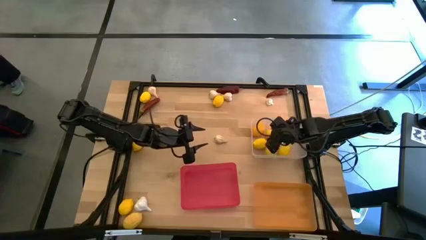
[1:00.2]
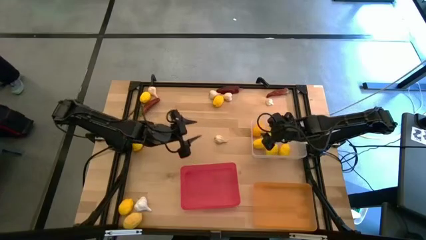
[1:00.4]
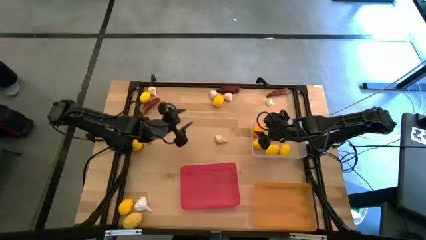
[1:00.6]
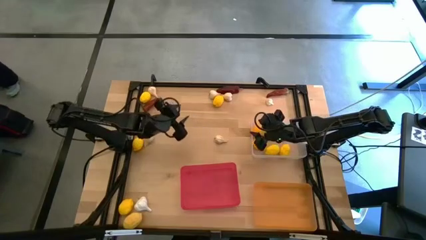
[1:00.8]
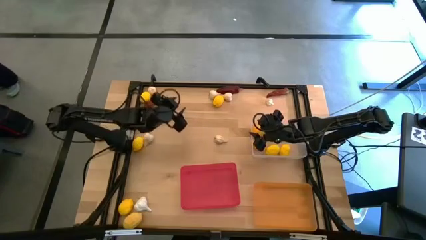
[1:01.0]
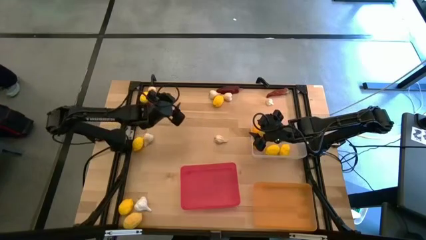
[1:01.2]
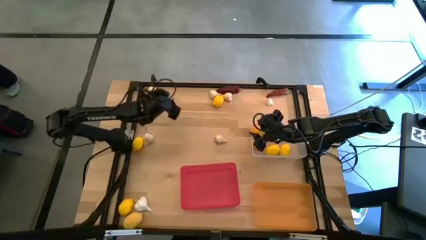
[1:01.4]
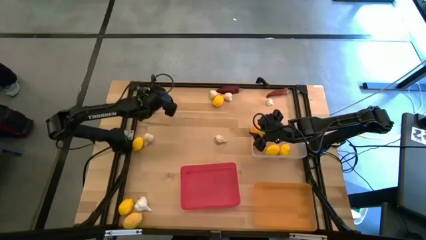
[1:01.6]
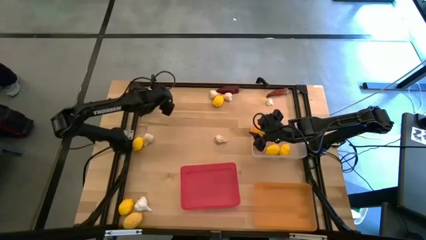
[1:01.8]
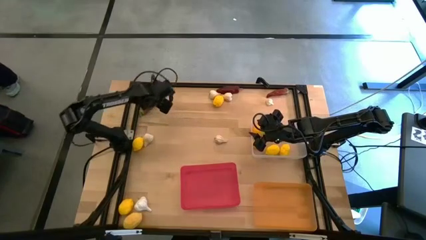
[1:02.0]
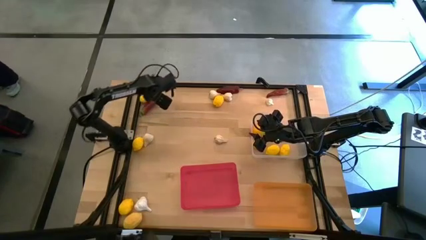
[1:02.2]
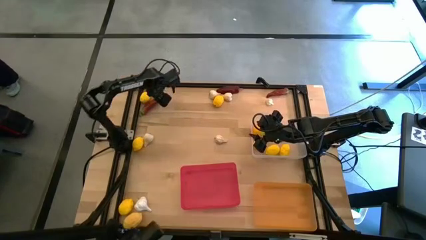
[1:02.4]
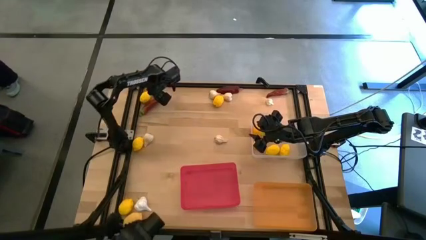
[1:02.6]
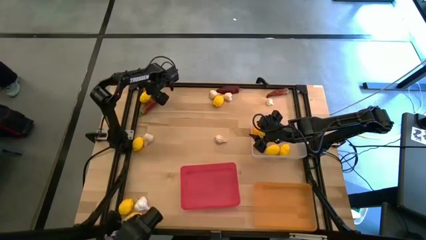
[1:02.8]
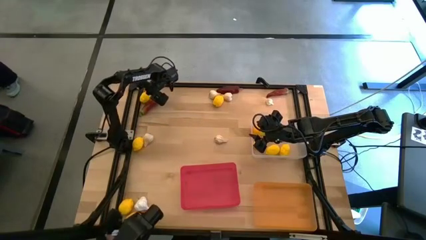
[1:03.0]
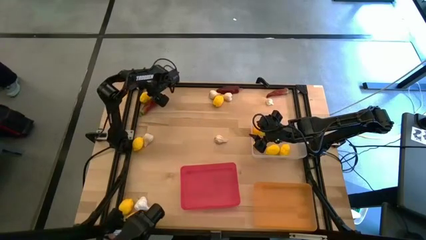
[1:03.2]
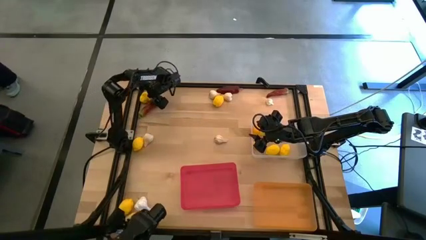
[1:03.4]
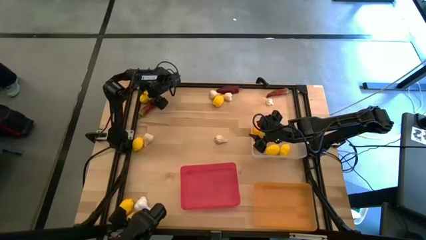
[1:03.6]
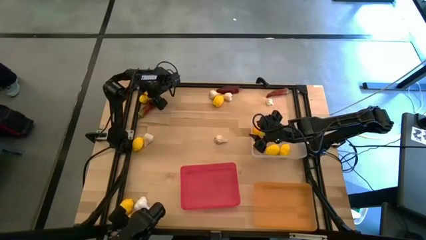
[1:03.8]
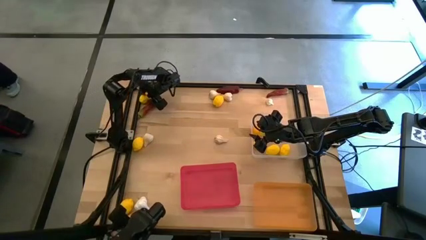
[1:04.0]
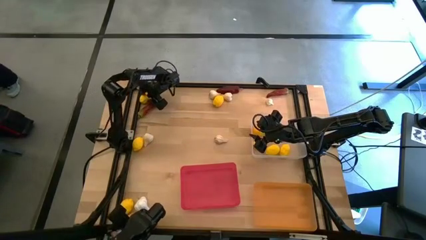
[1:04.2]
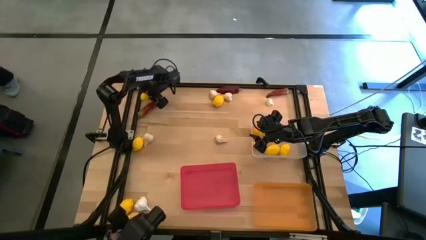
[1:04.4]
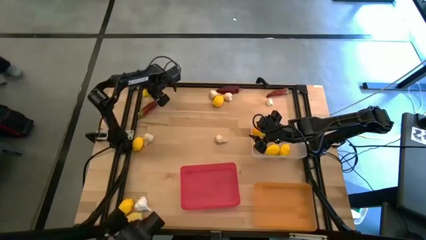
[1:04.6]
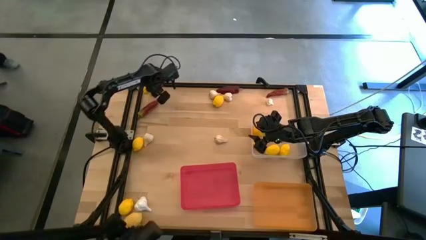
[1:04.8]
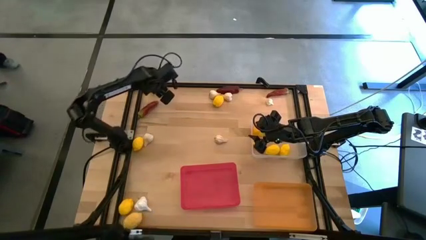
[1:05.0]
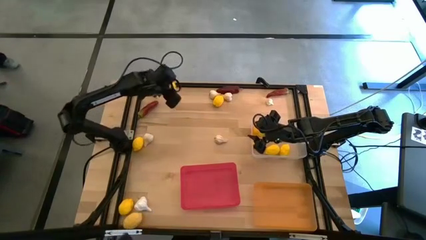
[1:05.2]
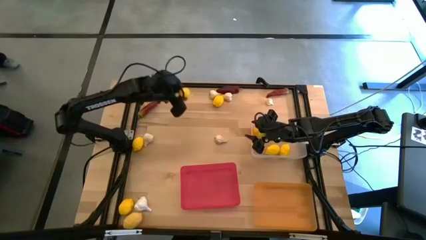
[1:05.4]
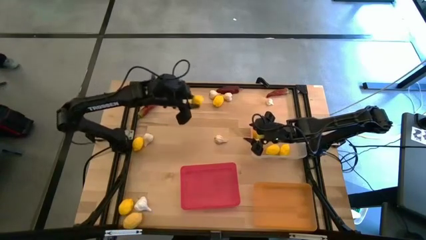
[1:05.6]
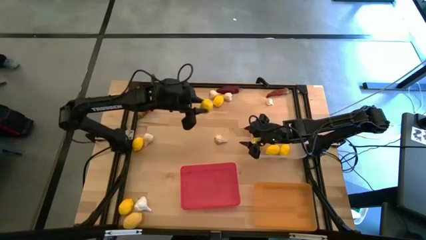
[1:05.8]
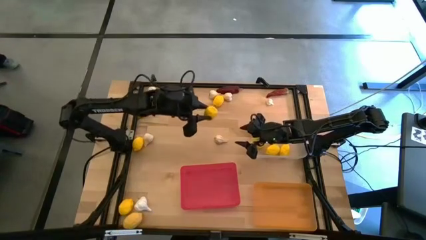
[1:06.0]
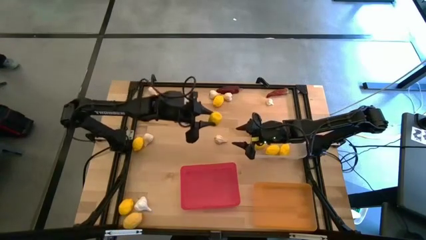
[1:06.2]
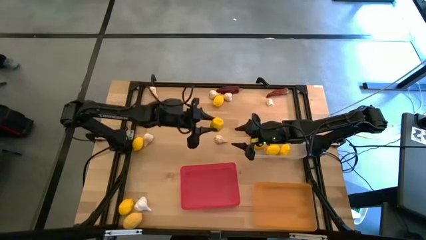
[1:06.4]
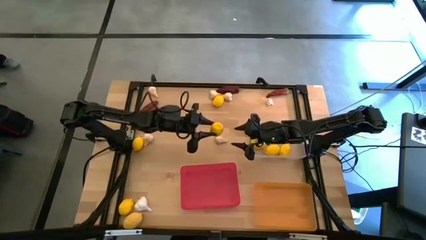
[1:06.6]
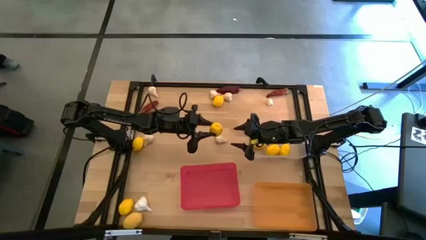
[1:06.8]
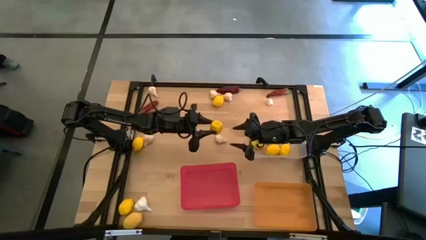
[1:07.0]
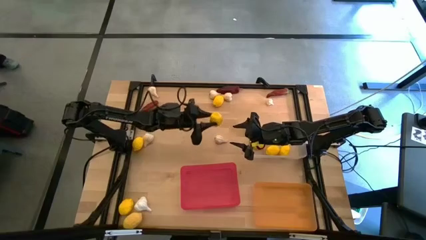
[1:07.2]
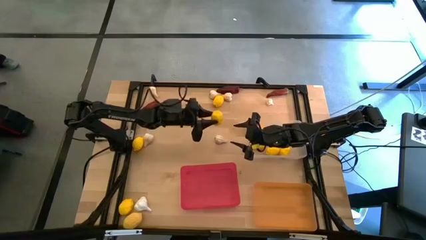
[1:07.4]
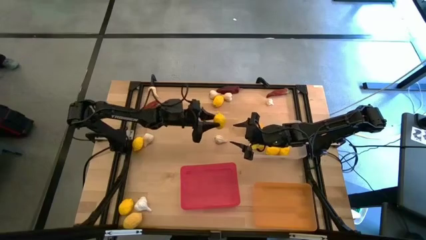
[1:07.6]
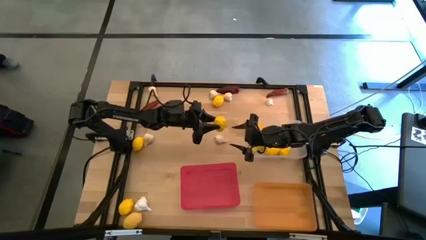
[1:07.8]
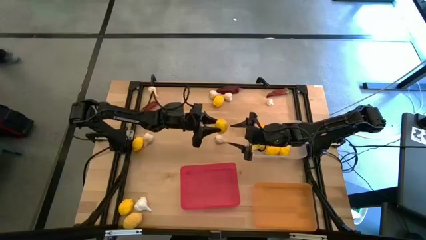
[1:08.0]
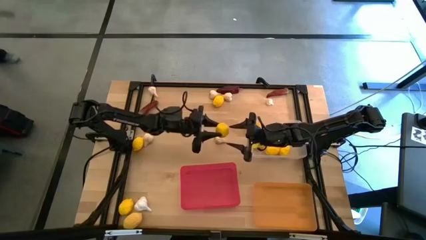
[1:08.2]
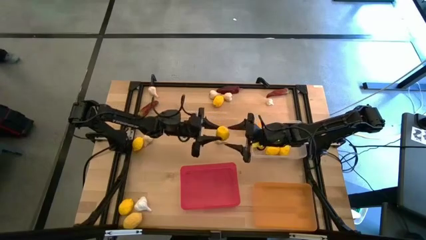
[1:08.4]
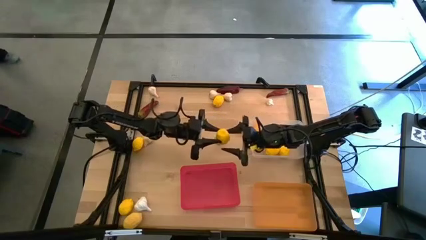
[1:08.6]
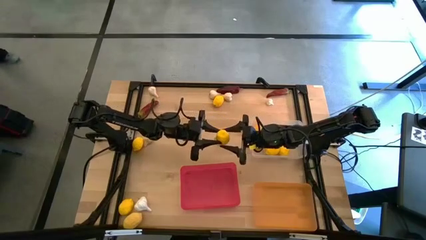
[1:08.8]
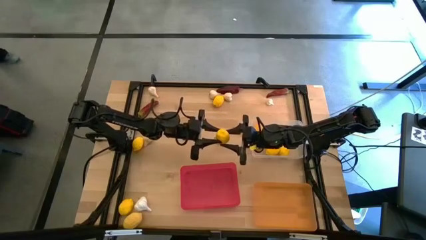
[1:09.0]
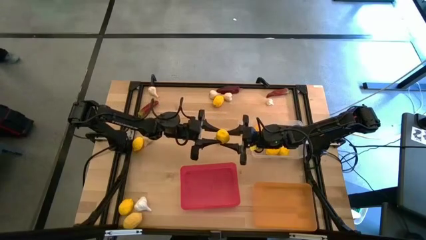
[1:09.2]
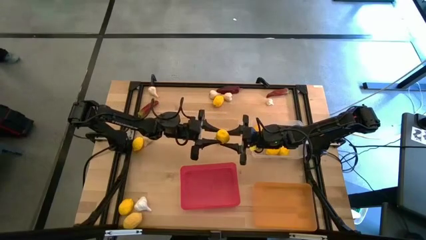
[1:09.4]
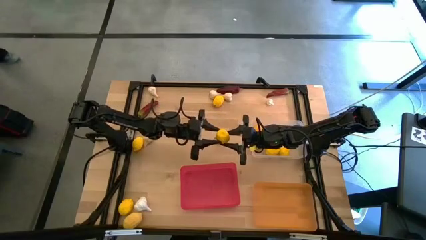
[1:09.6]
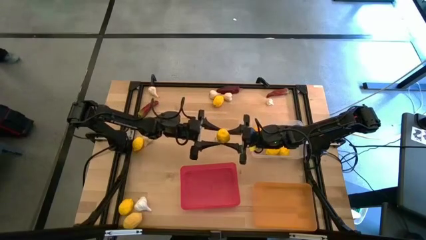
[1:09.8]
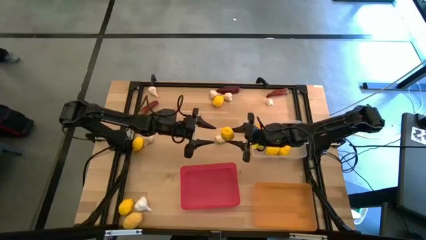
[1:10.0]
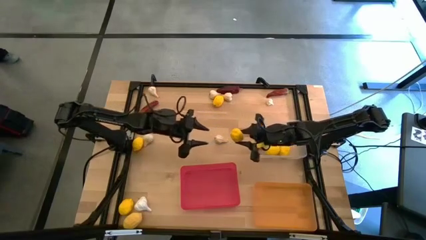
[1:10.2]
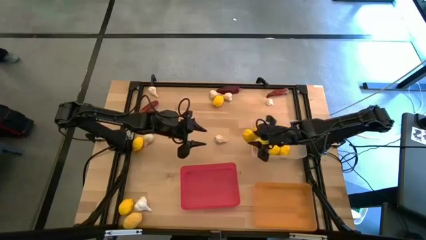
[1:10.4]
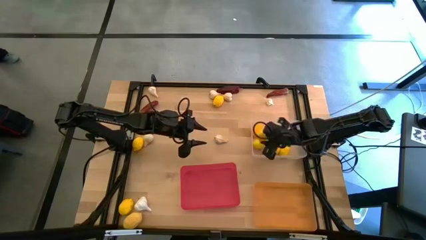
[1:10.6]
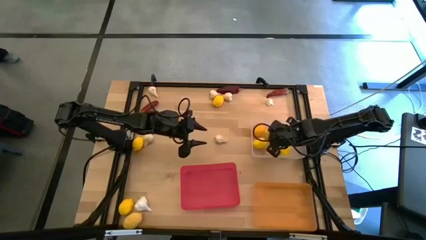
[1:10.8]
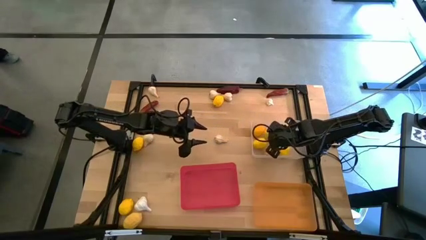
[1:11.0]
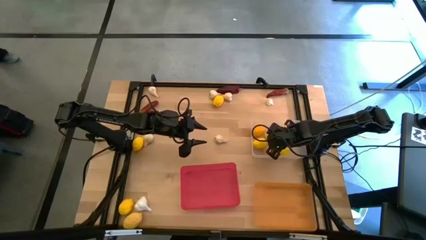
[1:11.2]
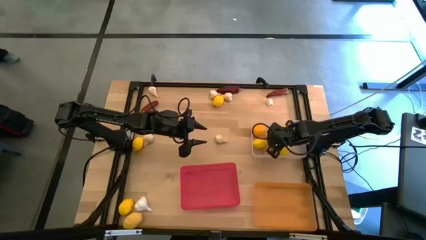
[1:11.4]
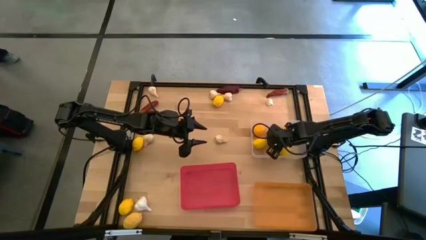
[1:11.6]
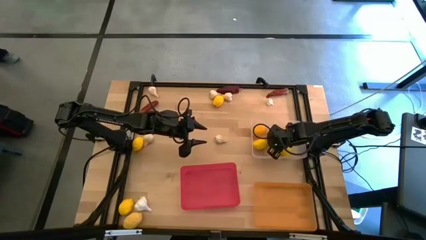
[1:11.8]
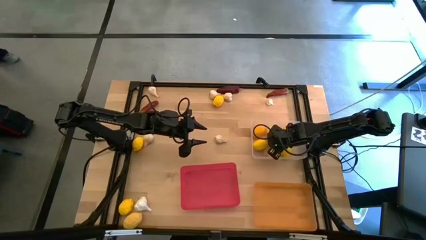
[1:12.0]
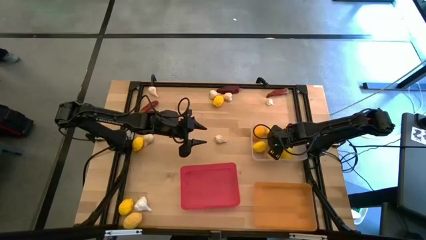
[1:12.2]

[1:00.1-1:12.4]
Task: Sort produce into baskets
Put the yellow lemon into the transparent bin

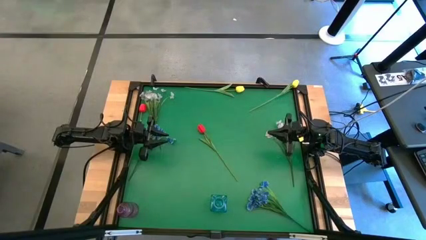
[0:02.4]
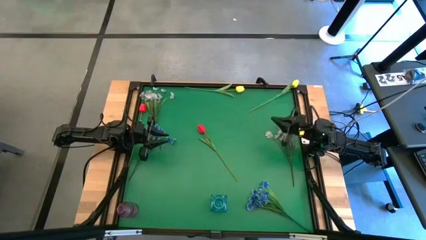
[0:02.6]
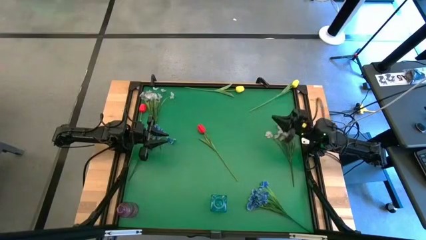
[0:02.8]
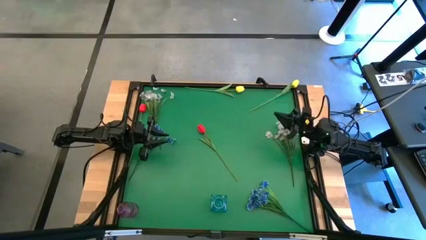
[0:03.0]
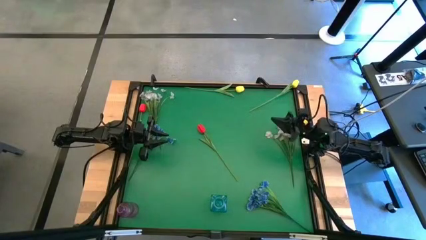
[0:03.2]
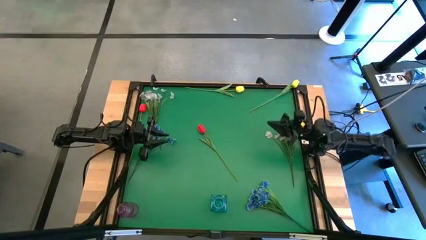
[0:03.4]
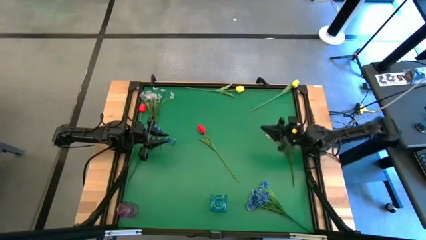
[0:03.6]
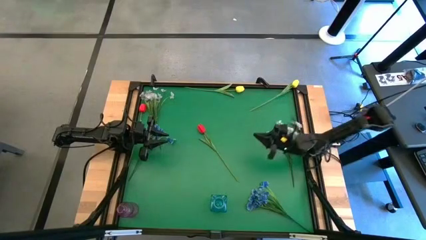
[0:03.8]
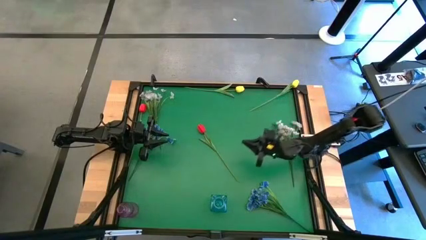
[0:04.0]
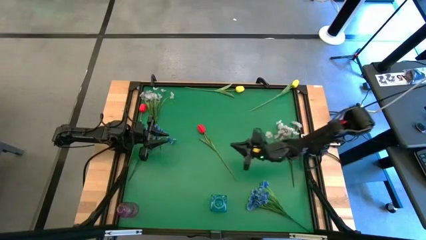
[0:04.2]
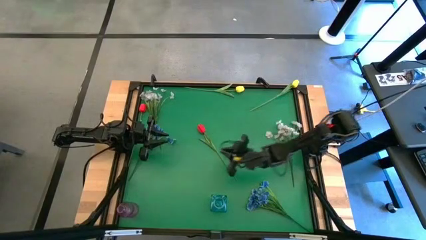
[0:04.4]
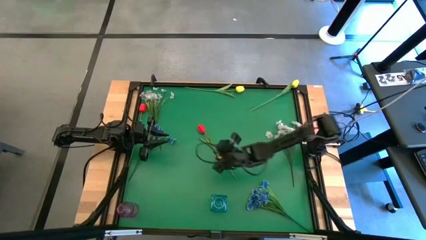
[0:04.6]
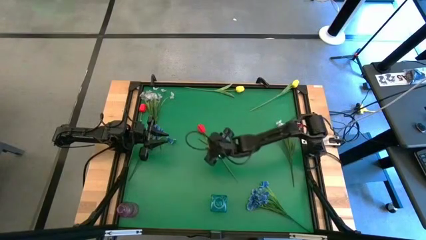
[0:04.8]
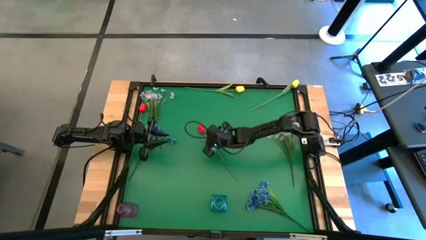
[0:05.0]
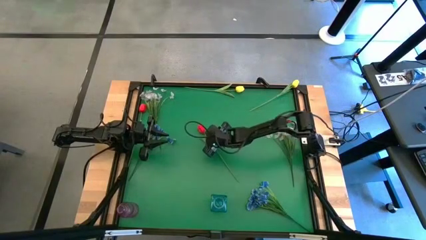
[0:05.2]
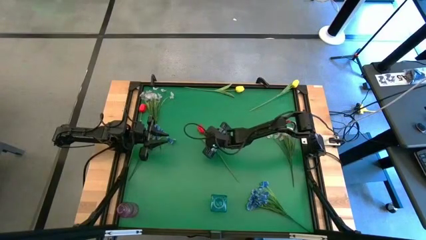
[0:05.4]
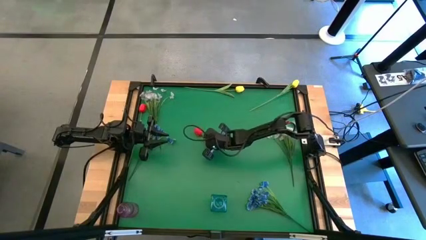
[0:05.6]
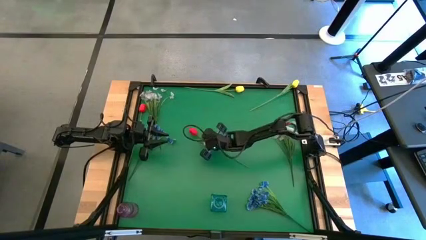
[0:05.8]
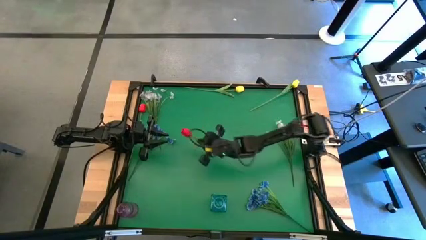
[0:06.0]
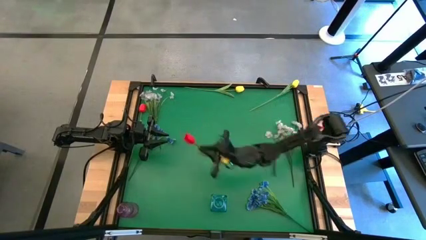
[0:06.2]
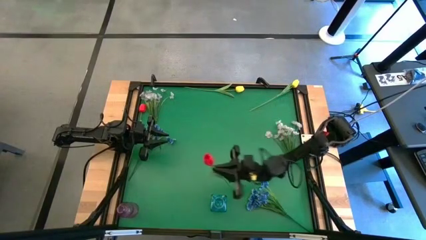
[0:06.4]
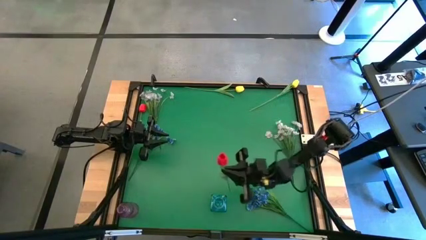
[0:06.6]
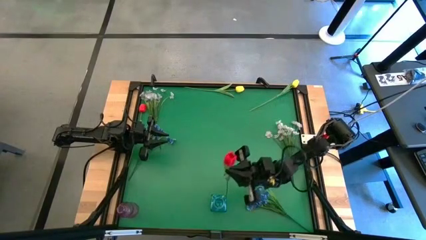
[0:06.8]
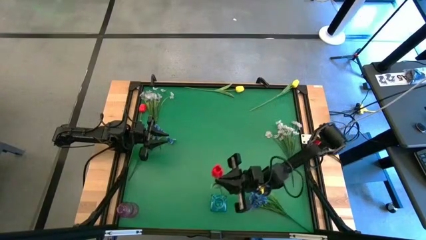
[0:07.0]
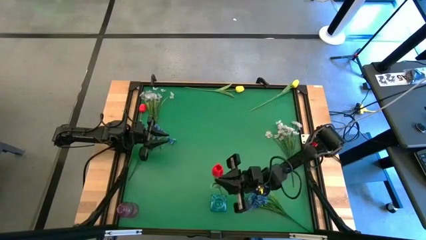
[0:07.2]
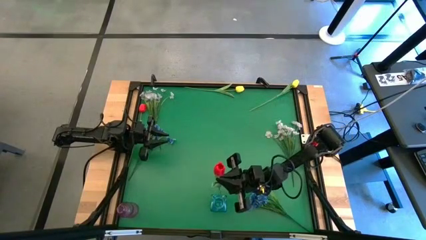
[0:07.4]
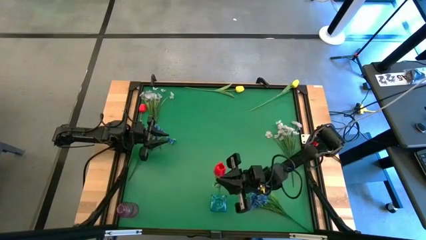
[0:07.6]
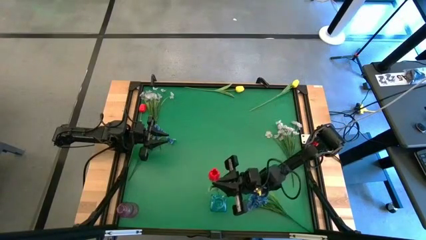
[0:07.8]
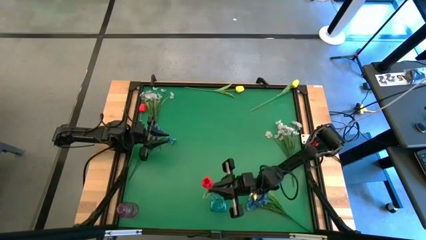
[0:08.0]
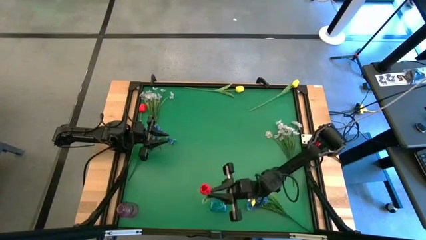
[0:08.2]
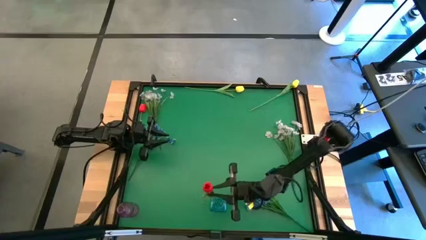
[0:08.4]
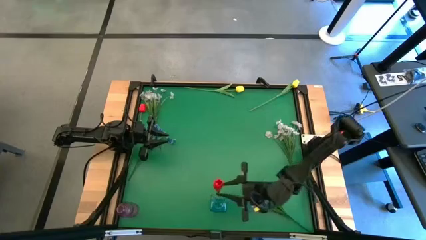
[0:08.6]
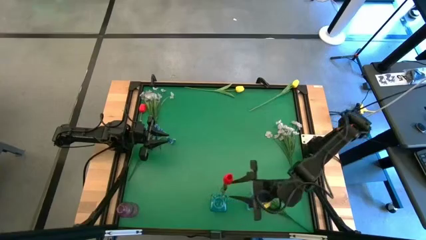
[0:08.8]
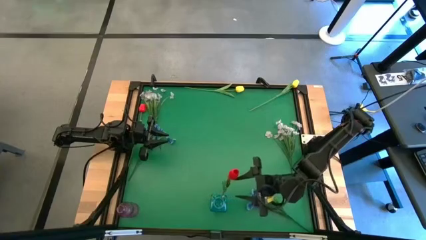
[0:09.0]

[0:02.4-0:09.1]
Task: Sort flowers into vase by color
Put the right red flower into the blue vase
